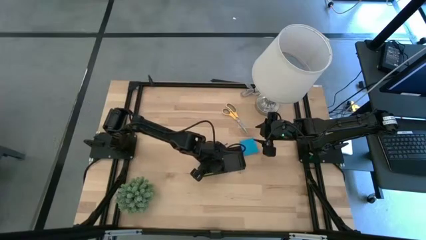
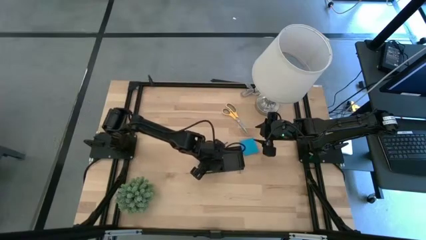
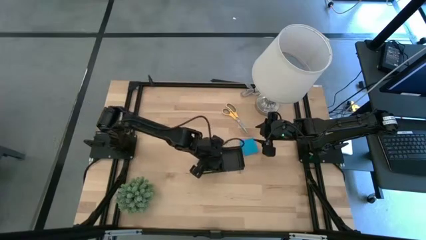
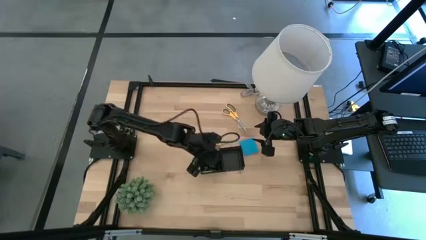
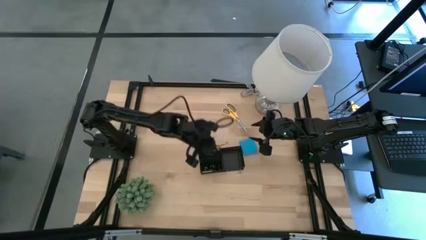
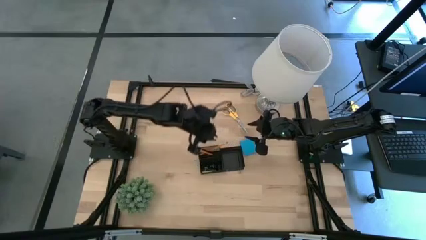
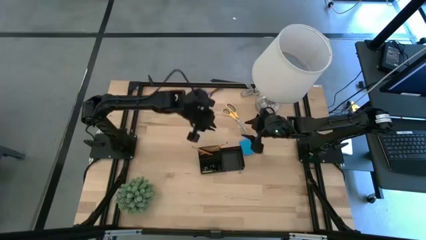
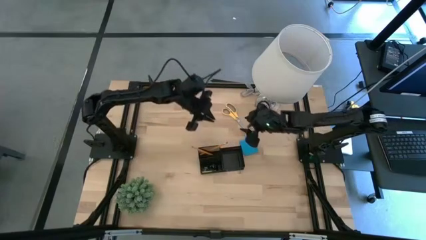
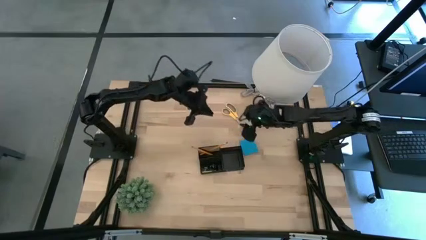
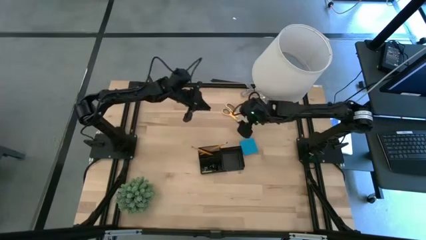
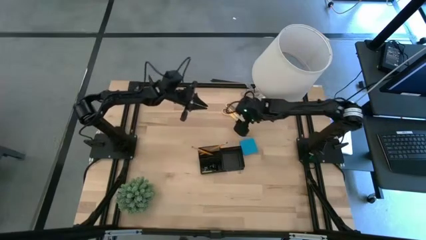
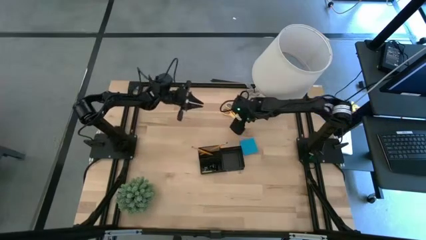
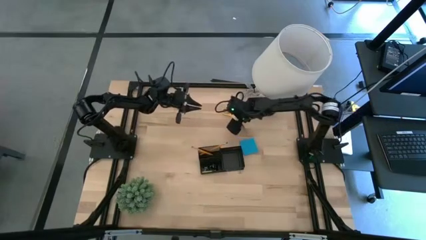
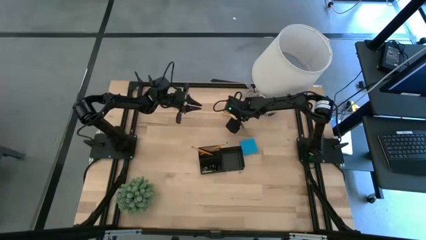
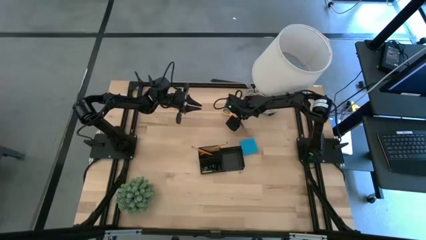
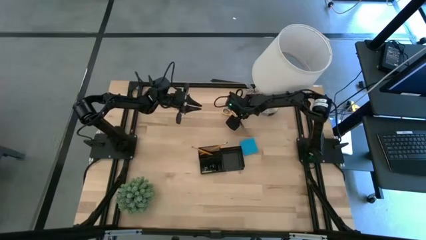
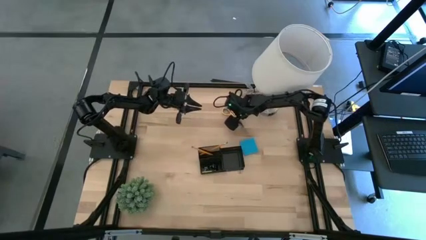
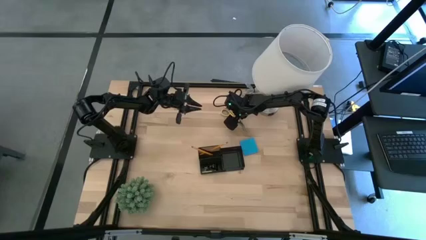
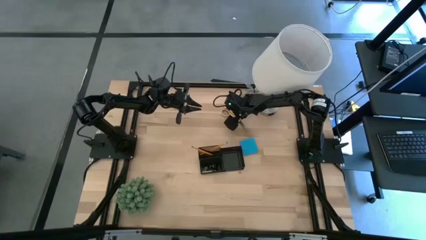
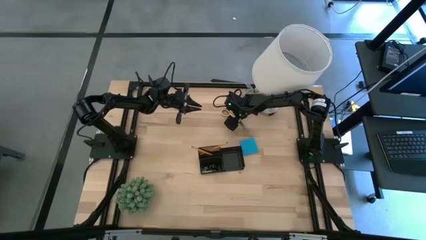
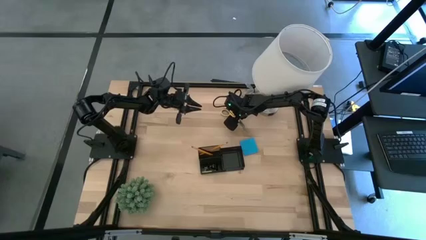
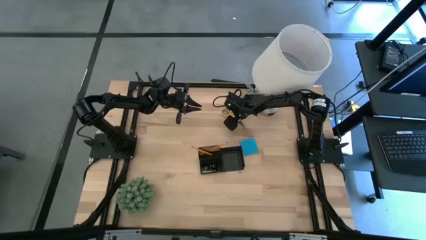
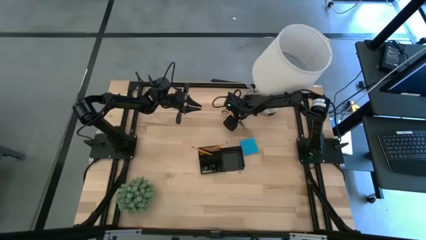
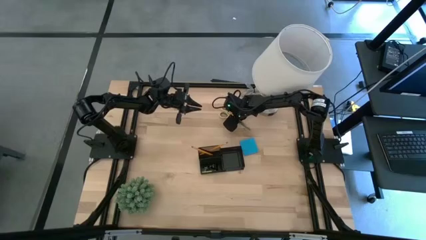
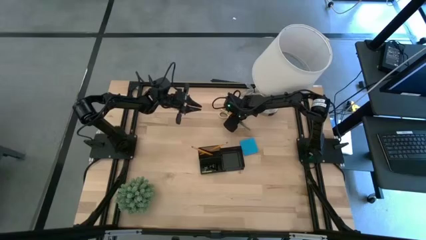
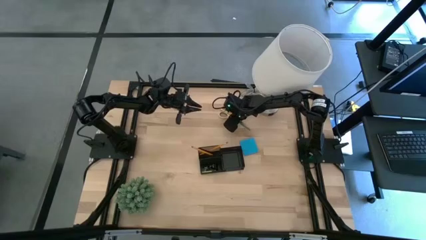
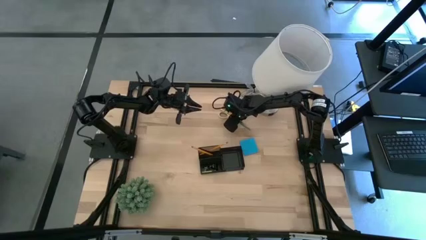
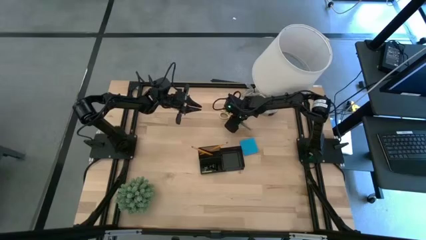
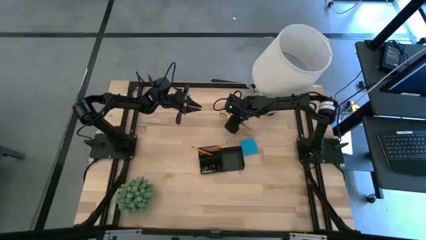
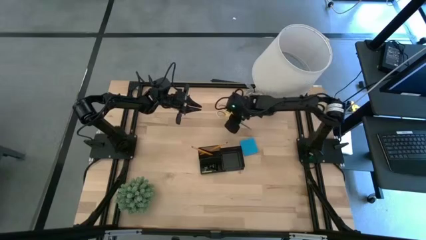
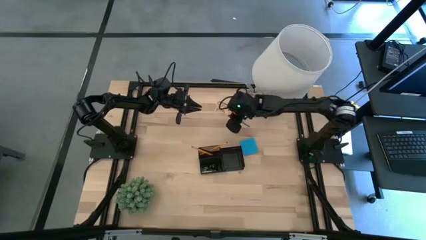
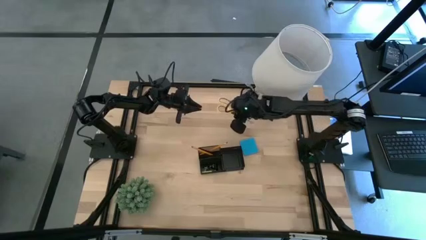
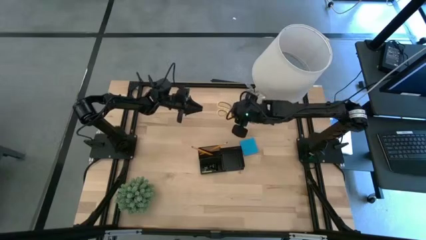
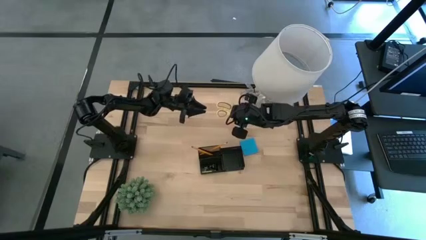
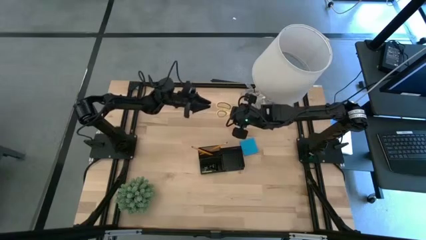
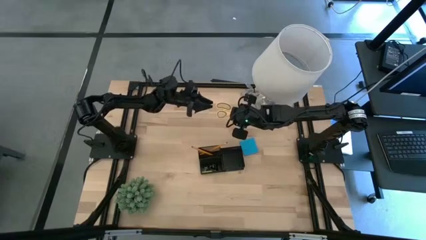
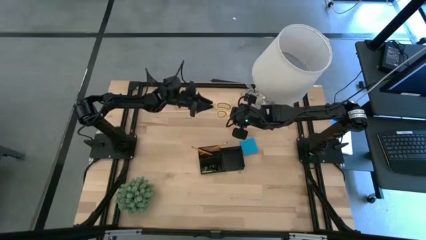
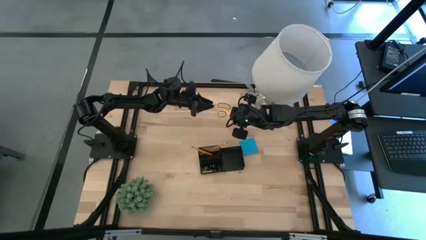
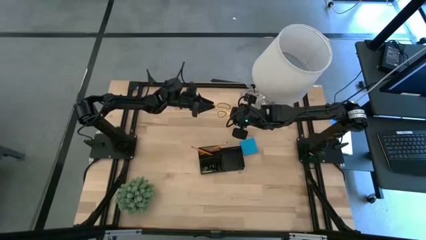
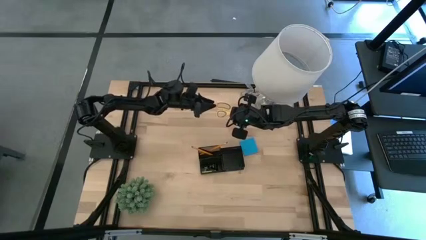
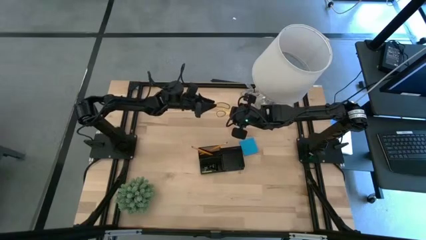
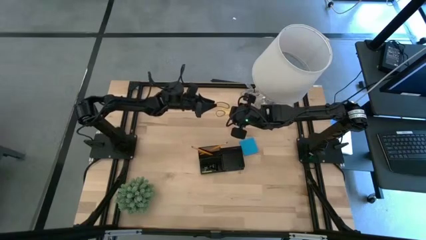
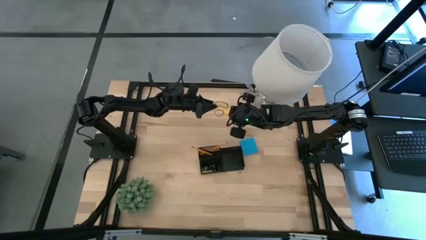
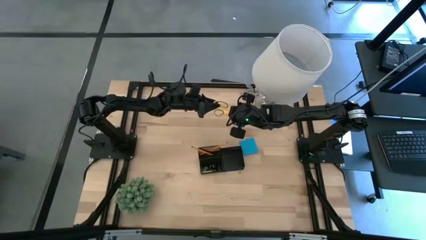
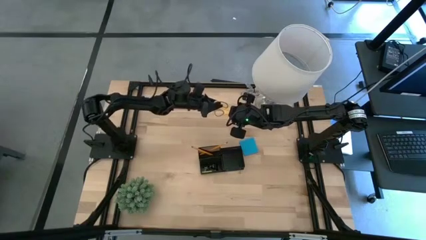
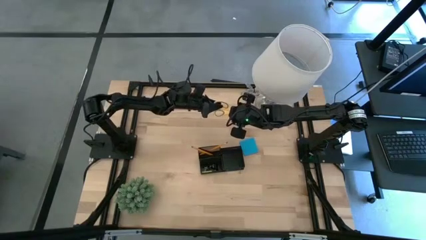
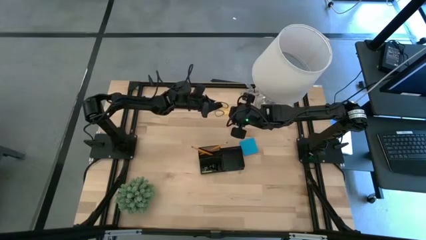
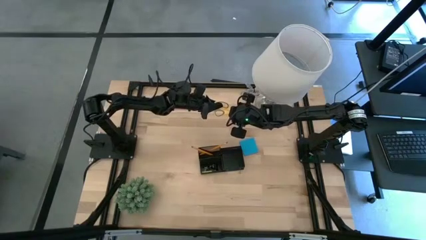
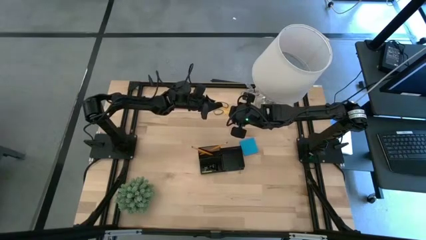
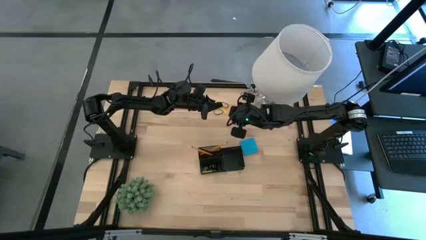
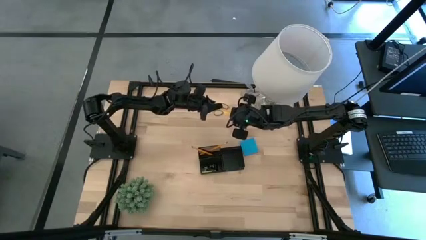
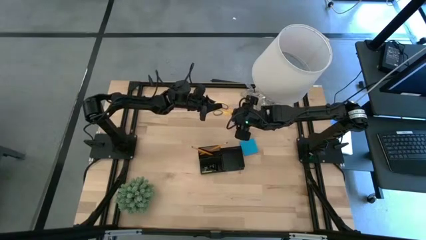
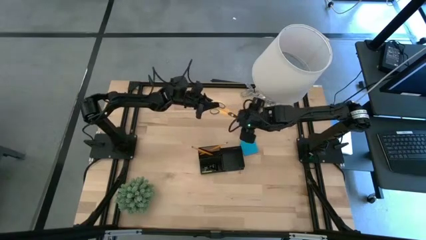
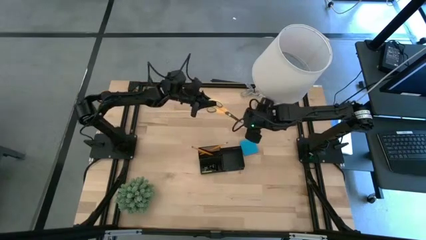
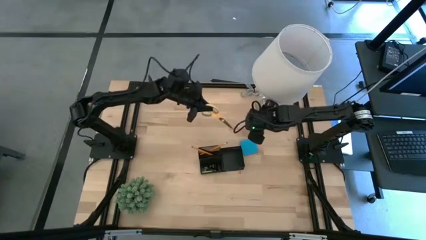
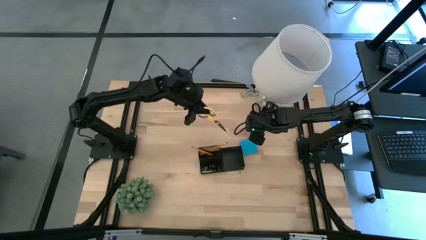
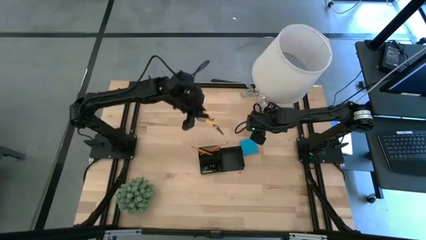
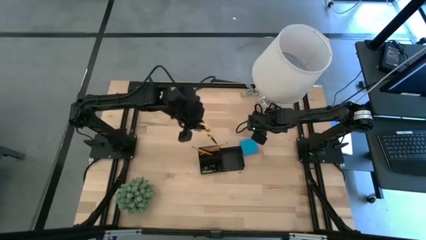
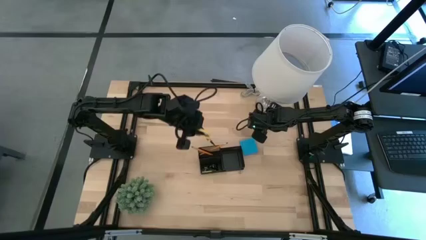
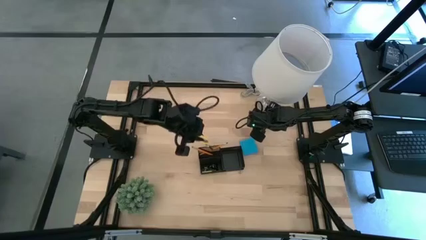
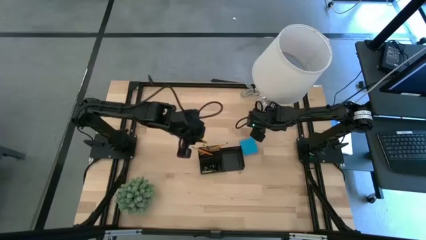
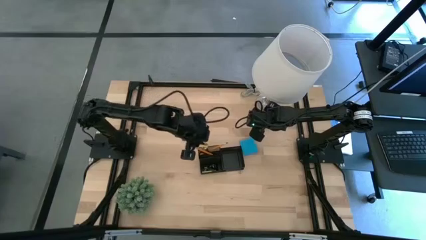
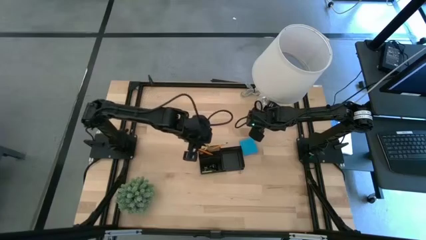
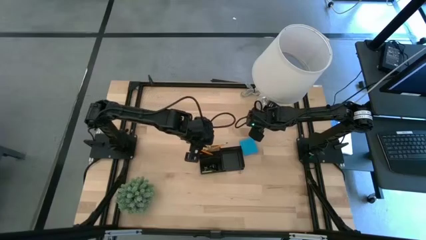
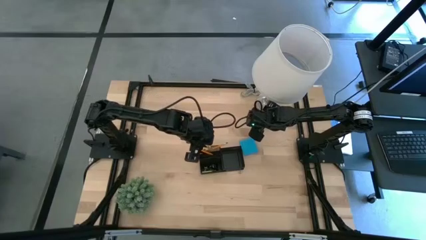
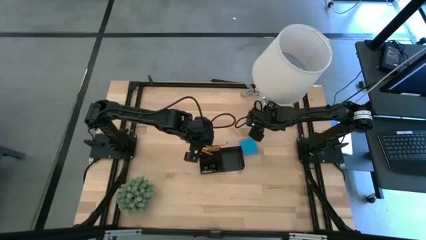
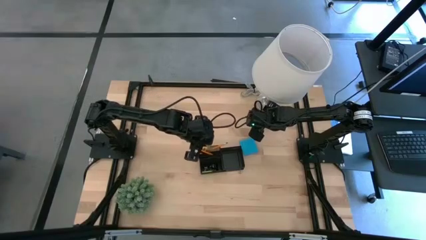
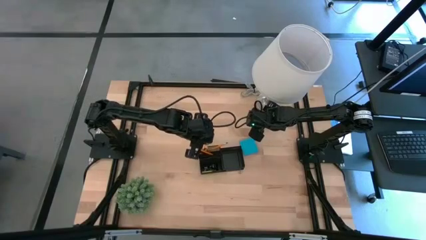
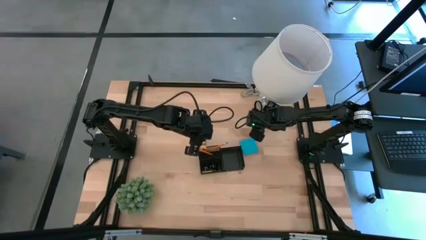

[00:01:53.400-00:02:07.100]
Task: Pick and place office supplies into organizer
Put the yellow scissors into the desk organizer

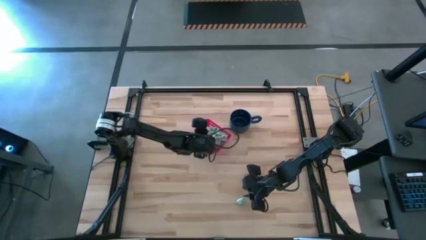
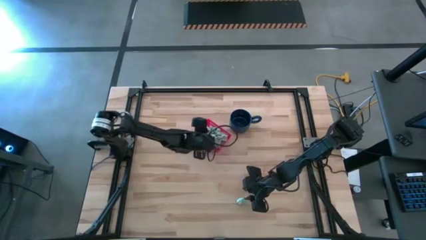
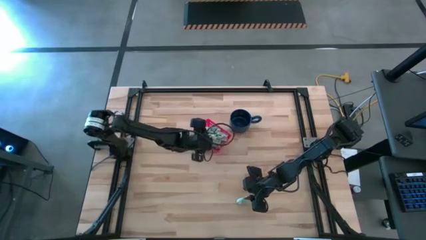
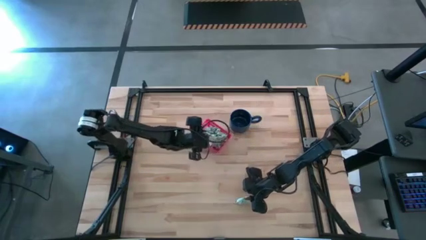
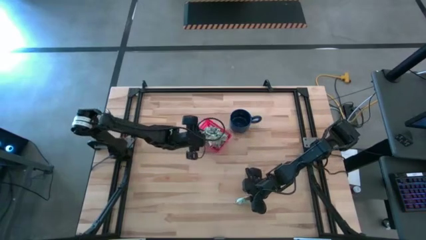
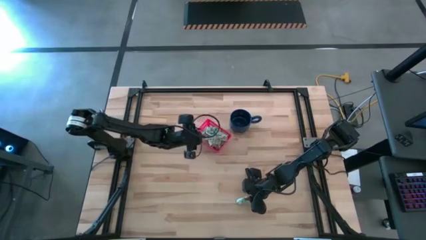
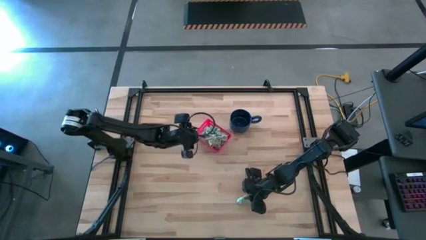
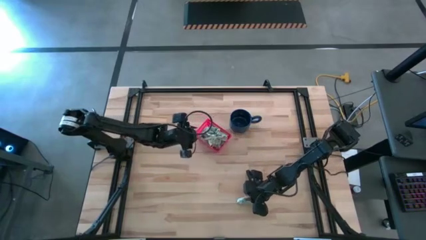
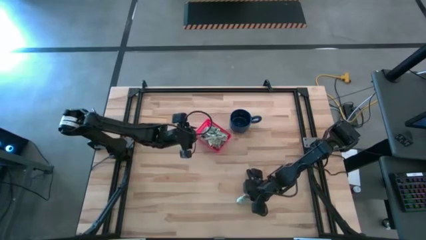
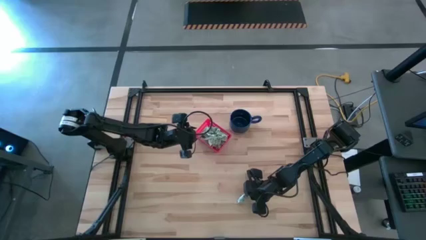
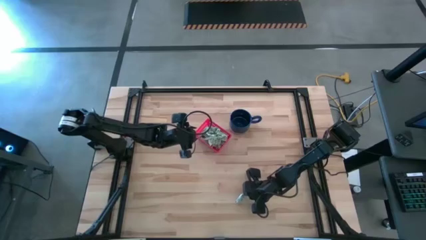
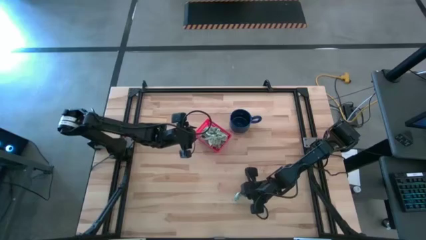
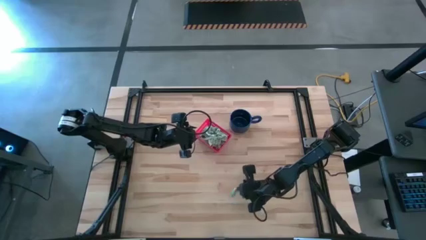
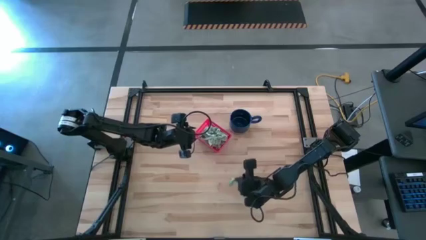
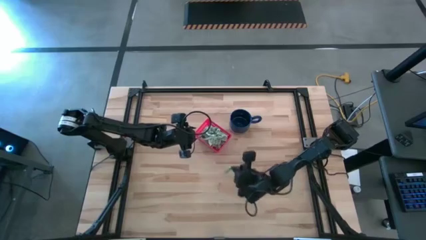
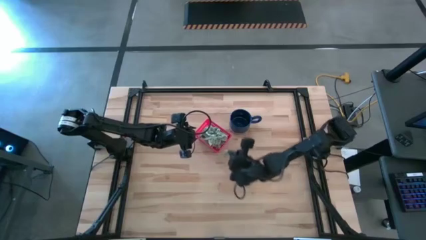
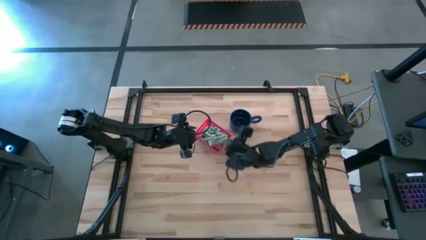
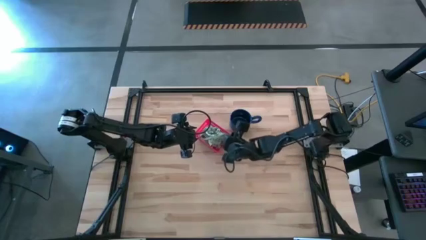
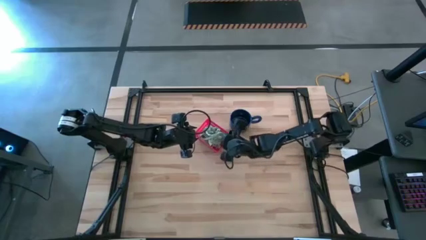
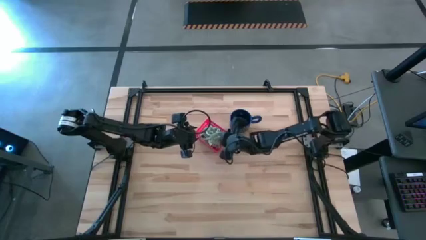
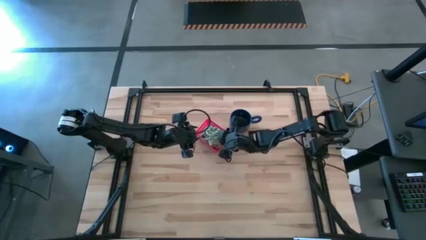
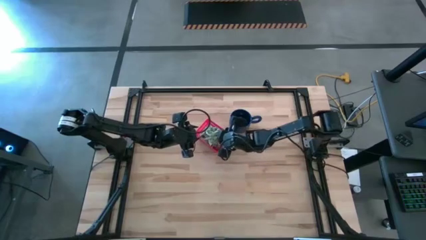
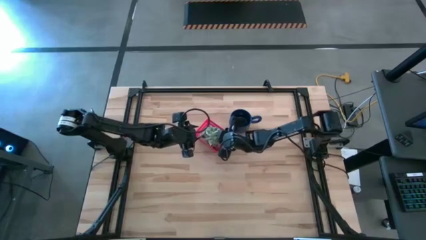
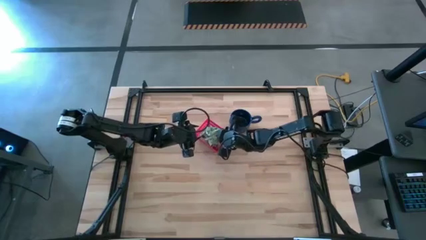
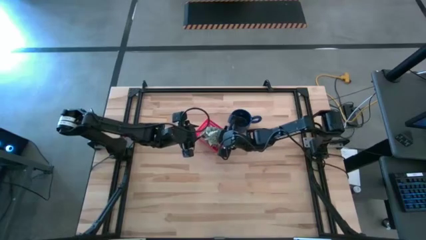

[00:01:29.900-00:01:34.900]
Task: Pick and place items into bin
Put the stevia packet into the bin
